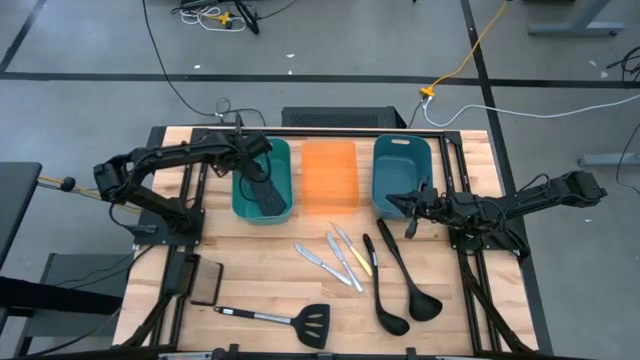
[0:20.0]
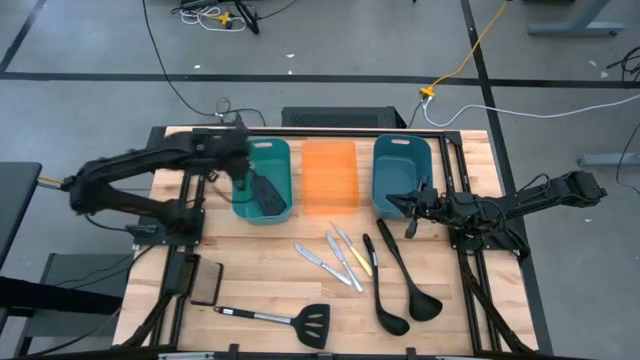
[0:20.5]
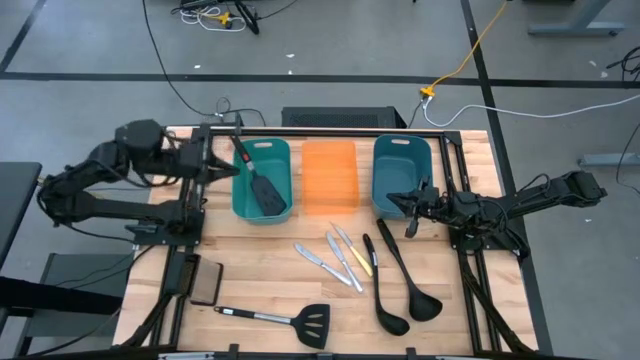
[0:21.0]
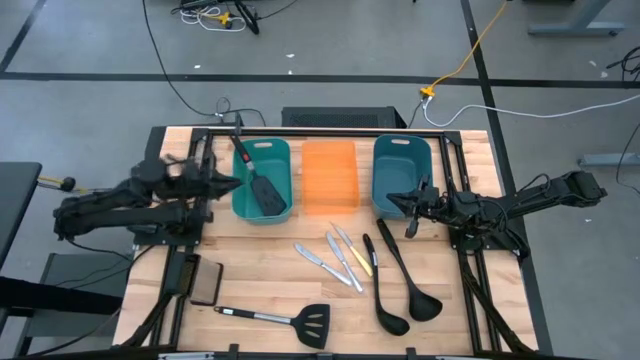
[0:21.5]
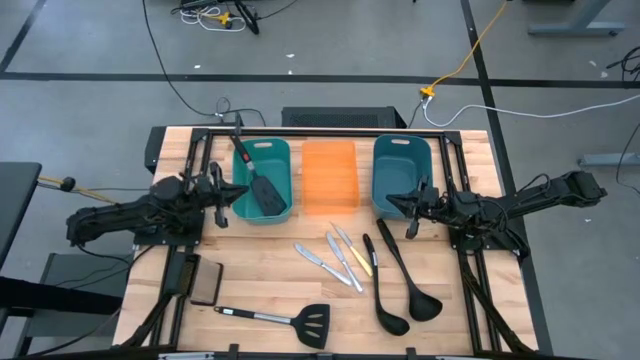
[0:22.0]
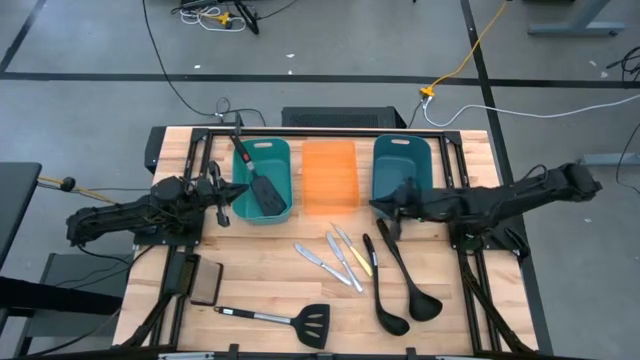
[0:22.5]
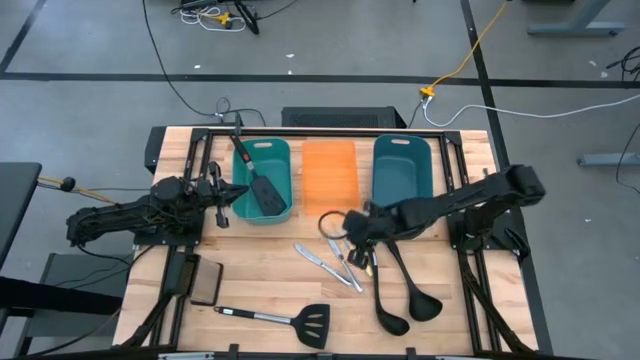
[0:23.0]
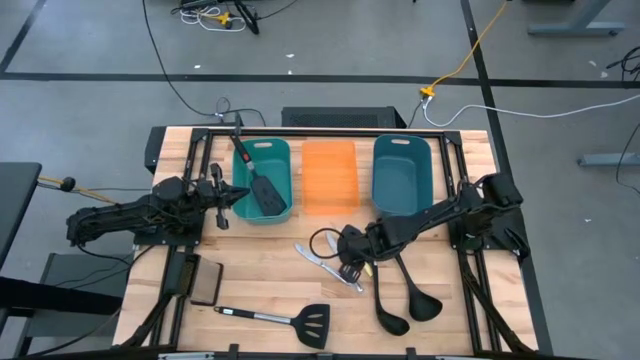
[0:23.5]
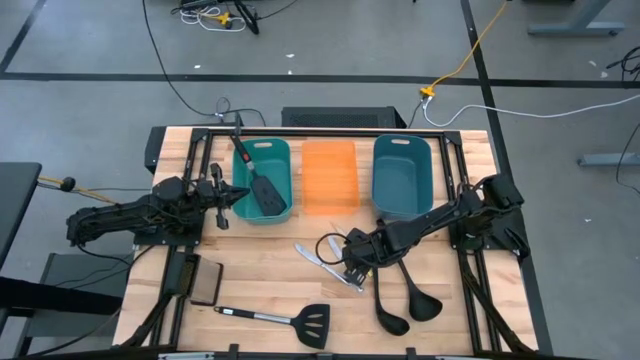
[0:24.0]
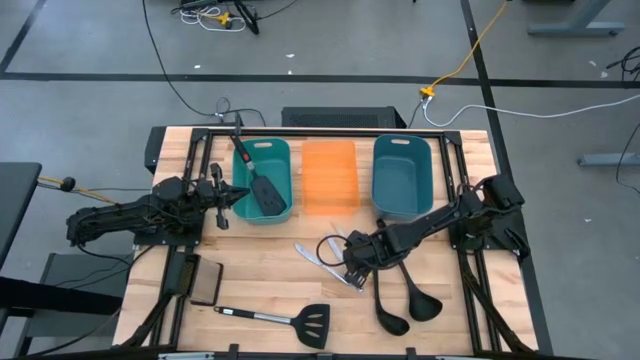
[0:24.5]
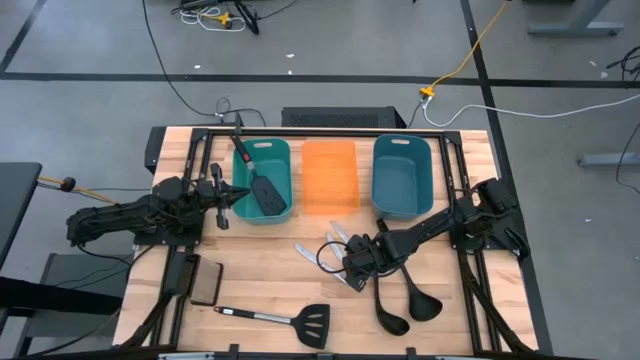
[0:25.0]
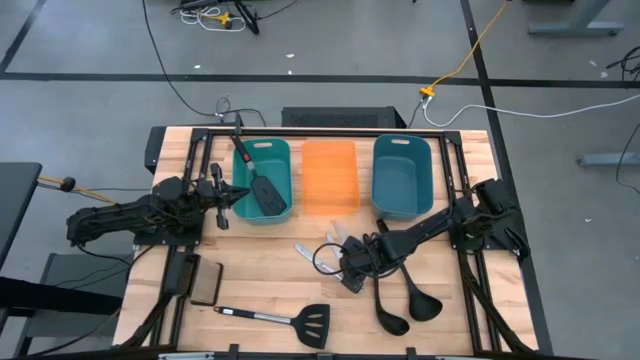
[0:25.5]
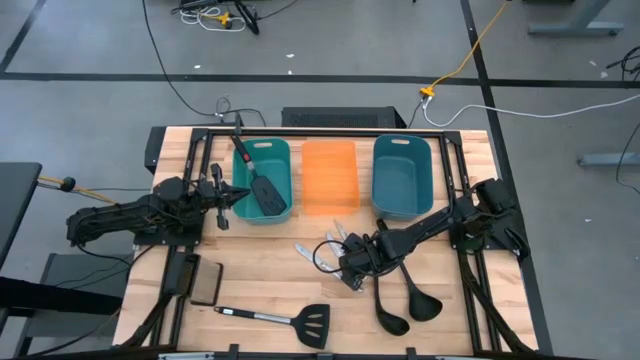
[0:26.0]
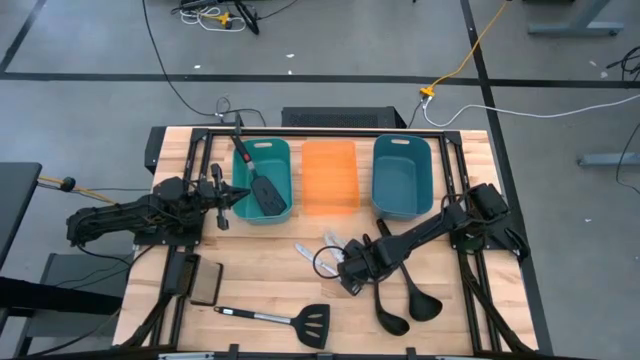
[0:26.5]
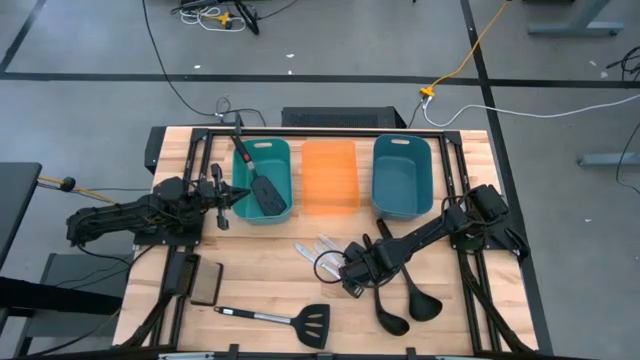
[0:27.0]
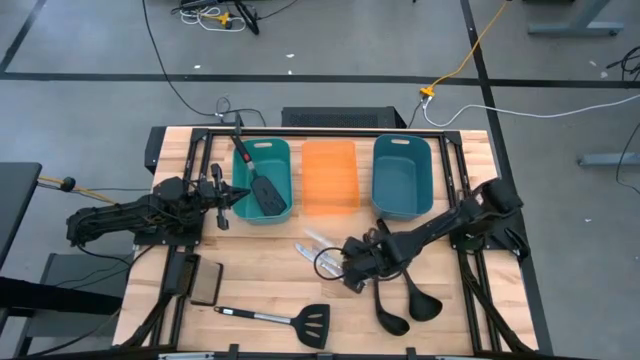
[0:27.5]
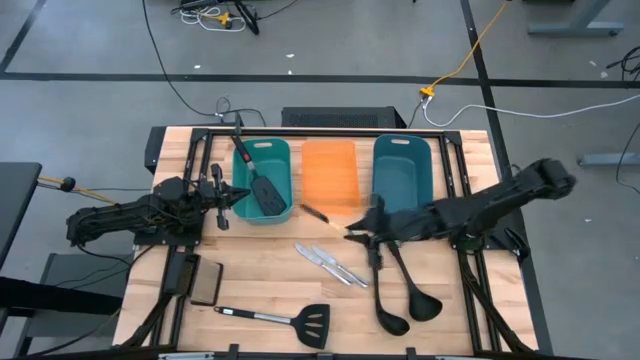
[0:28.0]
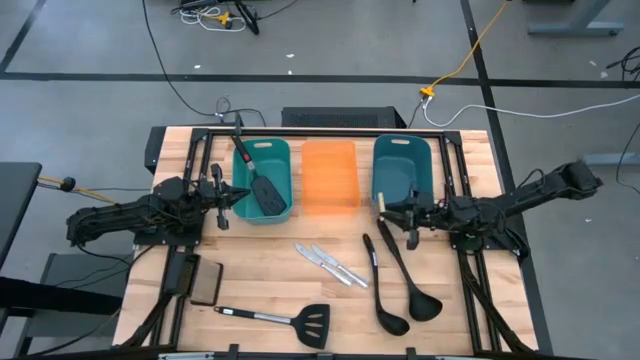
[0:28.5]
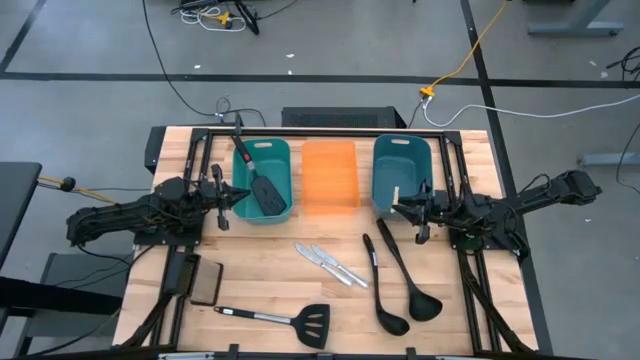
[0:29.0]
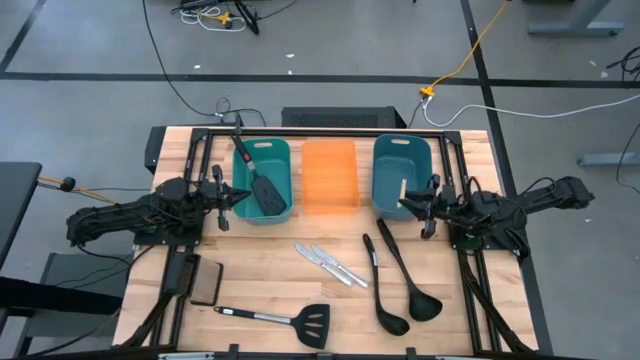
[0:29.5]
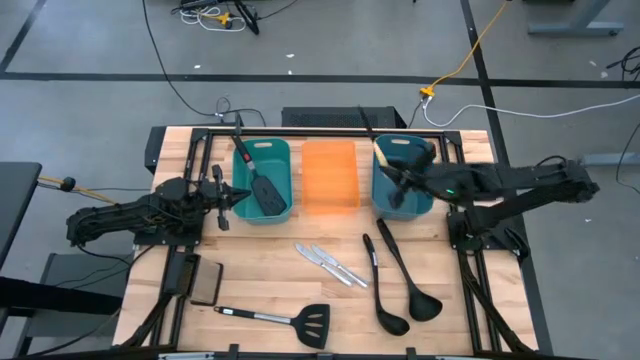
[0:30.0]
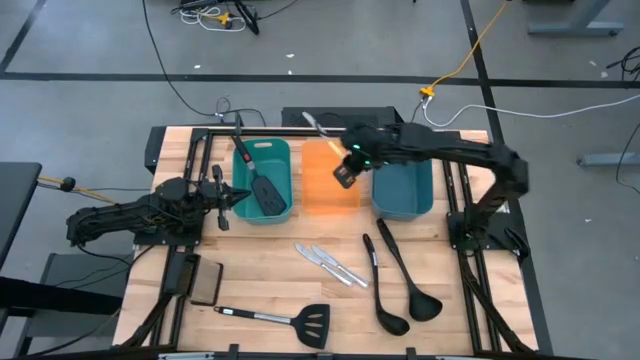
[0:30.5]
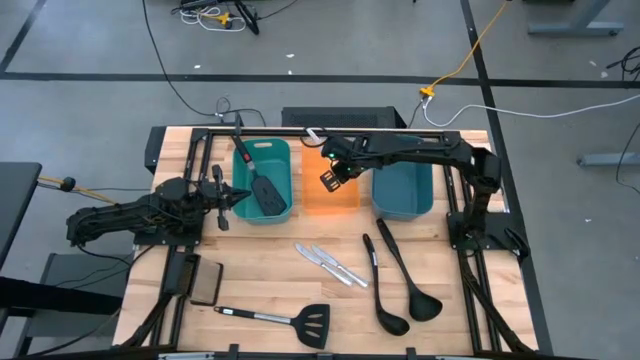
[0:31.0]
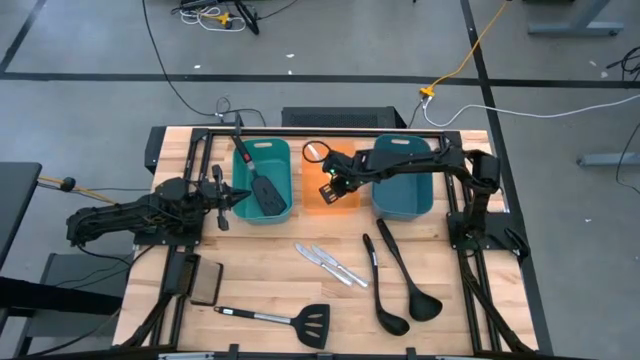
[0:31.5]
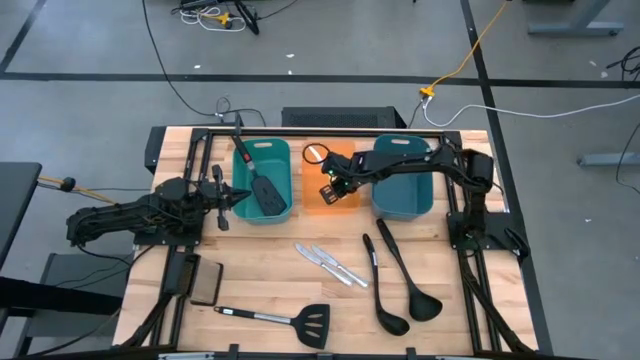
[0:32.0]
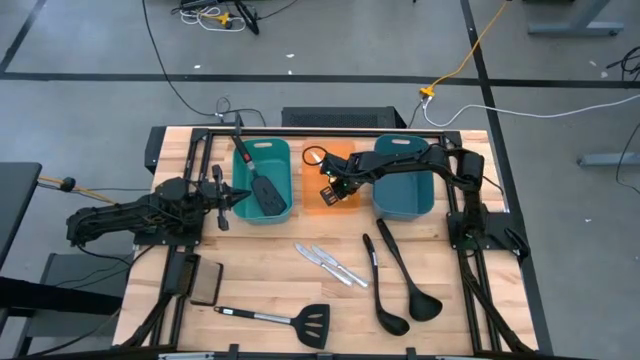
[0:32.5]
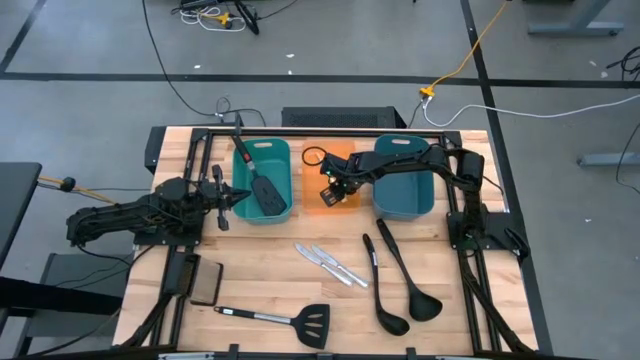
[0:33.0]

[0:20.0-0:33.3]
Task: Pick & Place Kitchen Items
Put the yellow knife into the orange bin
